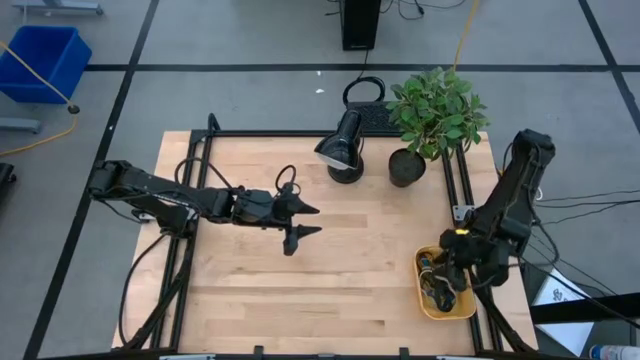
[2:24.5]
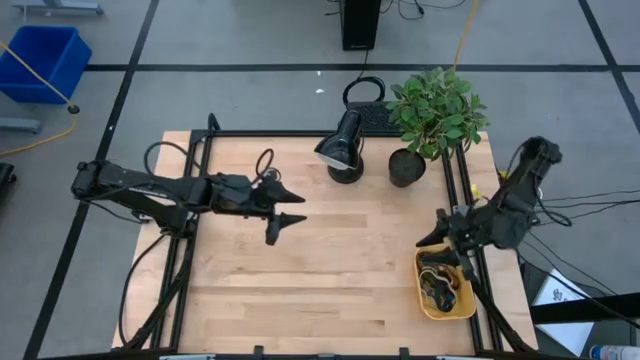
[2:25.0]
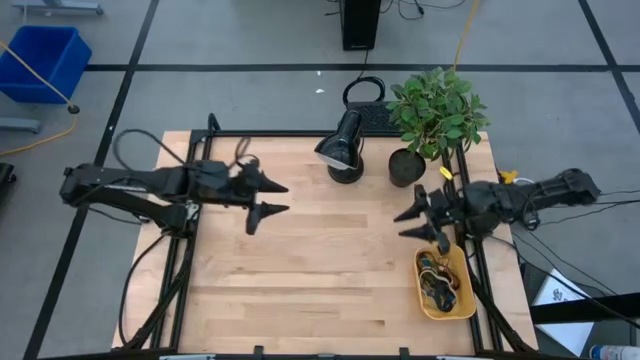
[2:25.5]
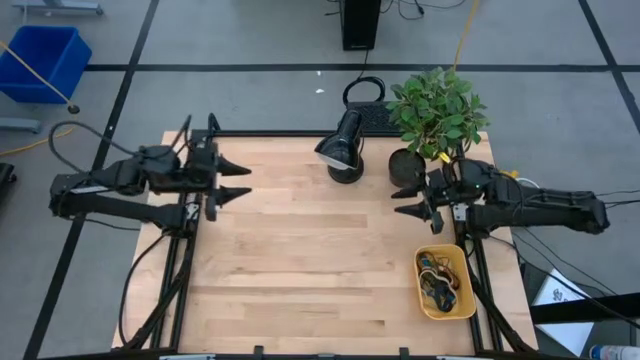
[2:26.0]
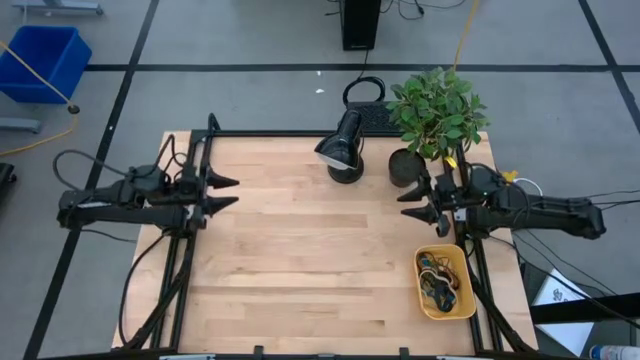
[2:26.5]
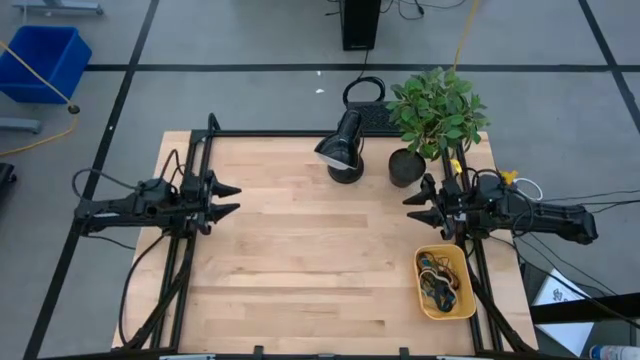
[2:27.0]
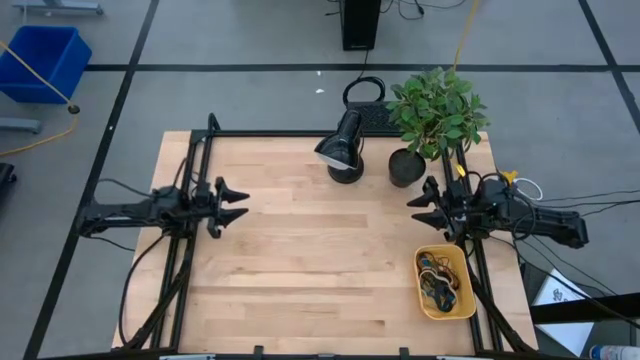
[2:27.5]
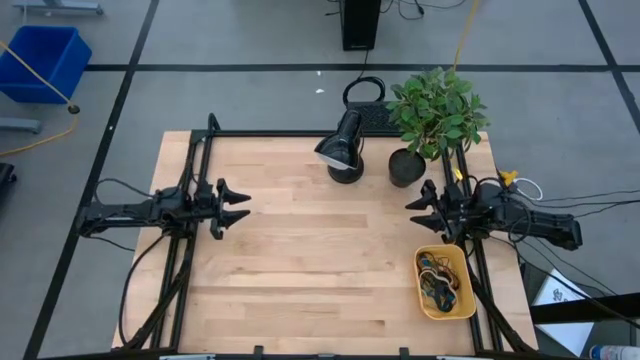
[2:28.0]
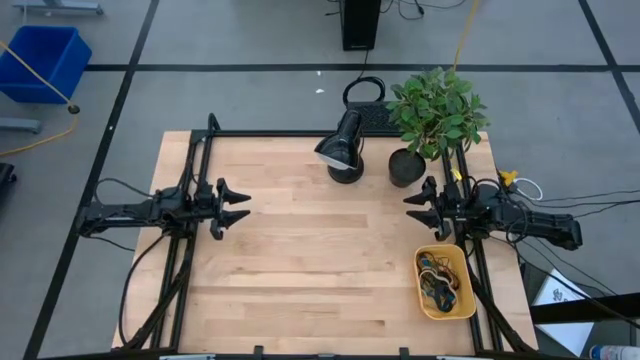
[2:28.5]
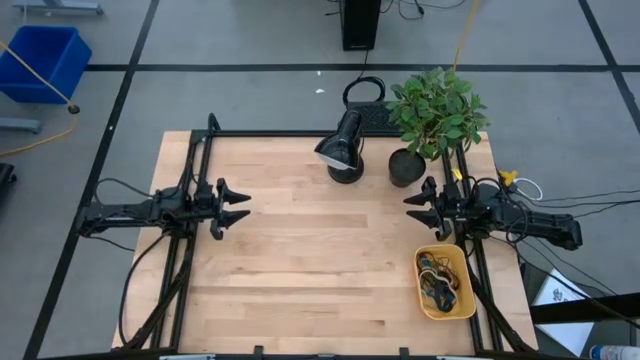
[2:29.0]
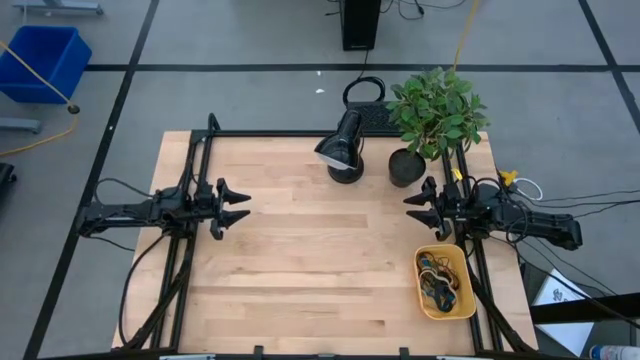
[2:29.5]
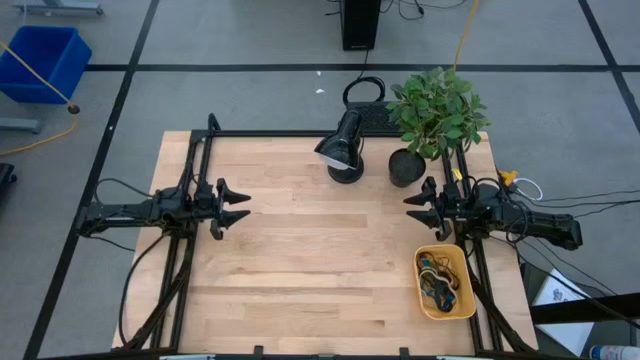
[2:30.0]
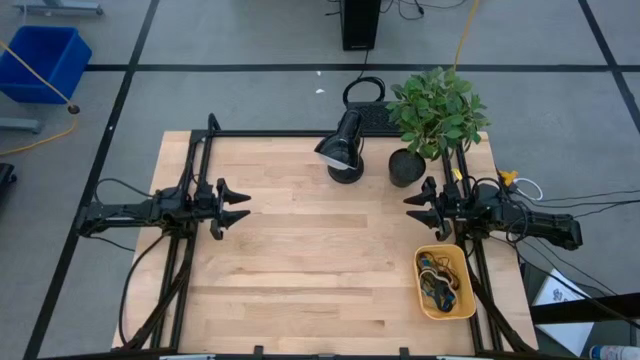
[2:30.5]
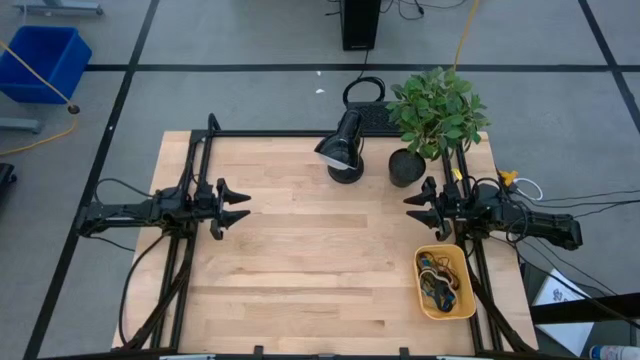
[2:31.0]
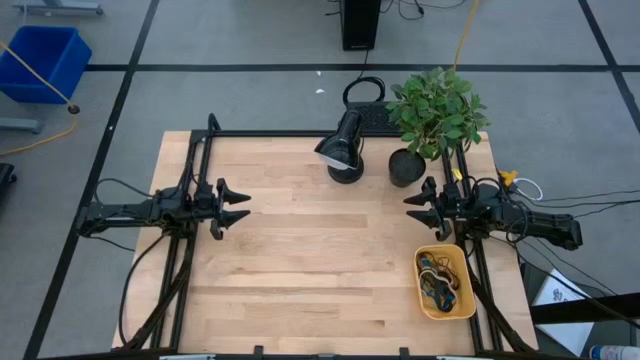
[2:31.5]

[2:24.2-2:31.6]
Task: Pick and place rubber bands into bin
Return to Home Position

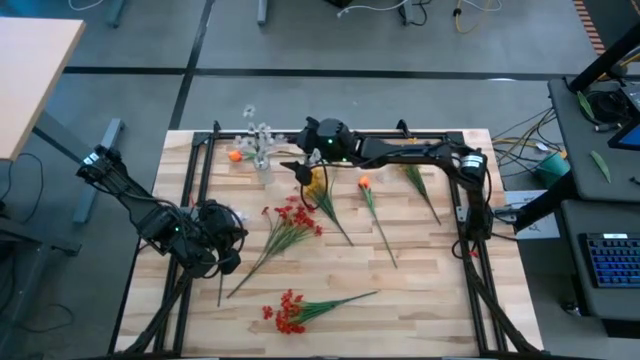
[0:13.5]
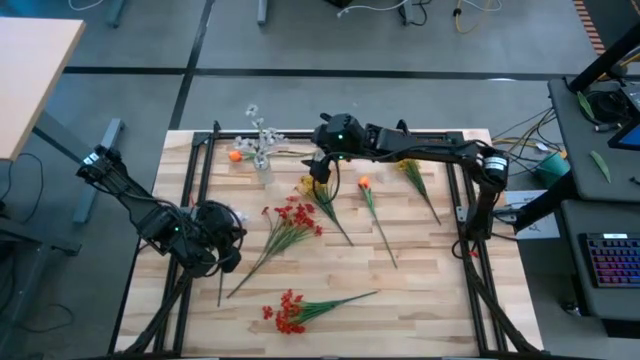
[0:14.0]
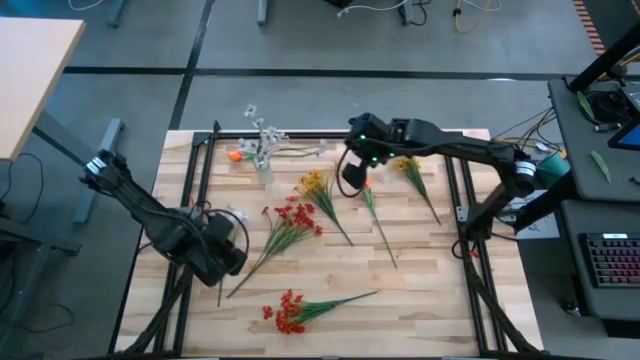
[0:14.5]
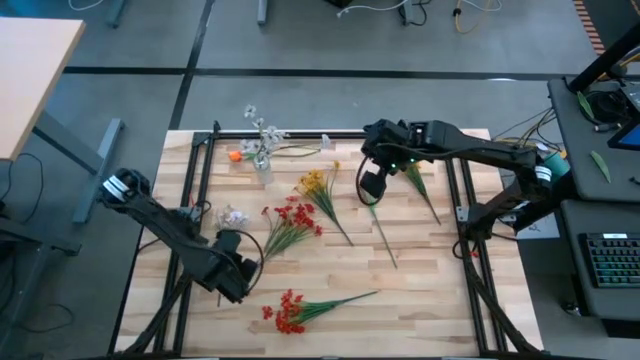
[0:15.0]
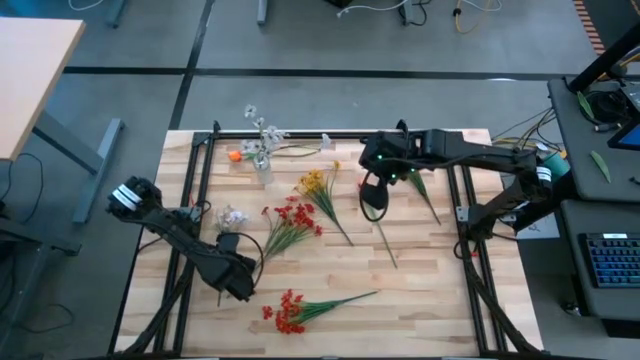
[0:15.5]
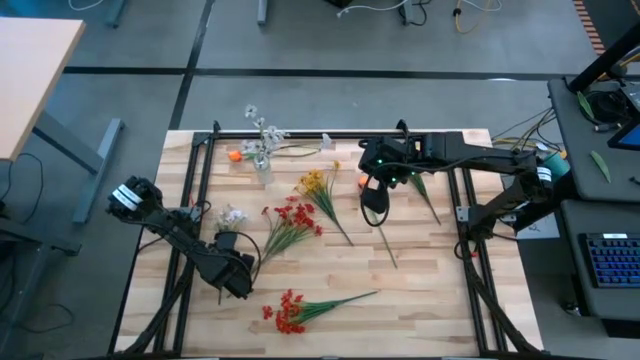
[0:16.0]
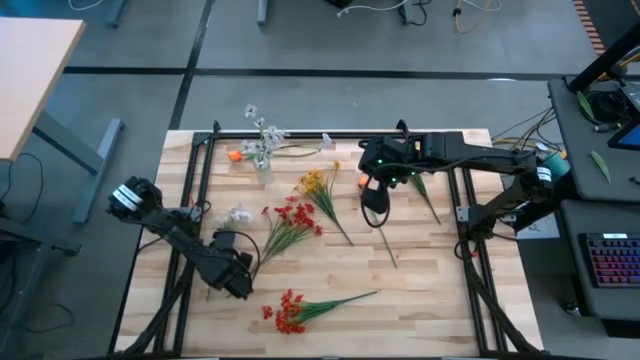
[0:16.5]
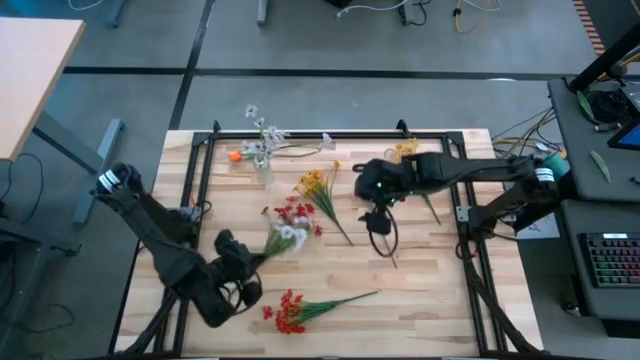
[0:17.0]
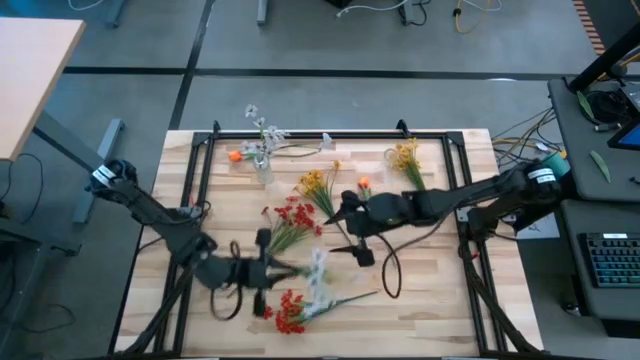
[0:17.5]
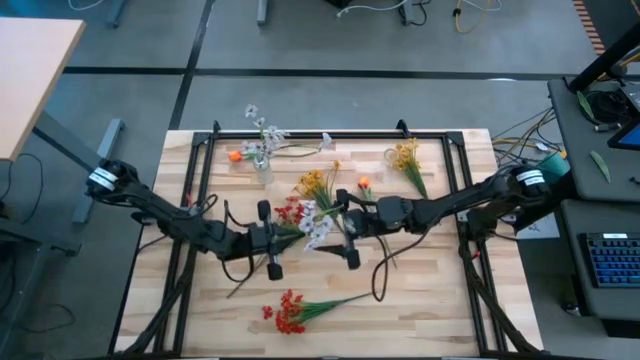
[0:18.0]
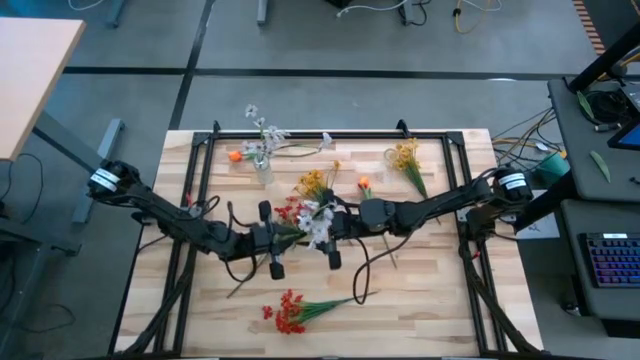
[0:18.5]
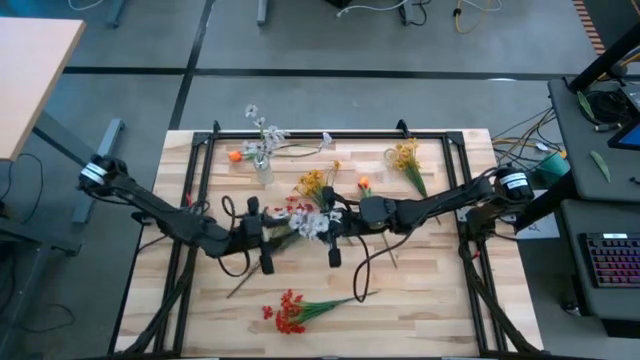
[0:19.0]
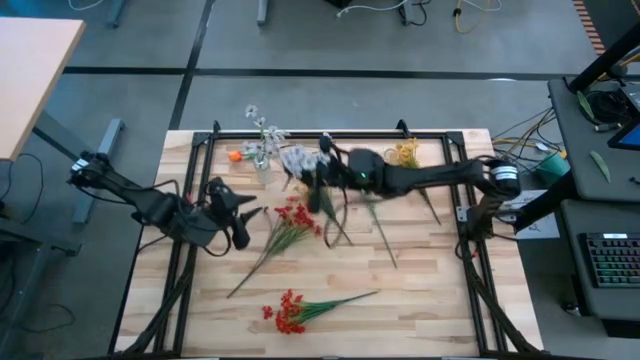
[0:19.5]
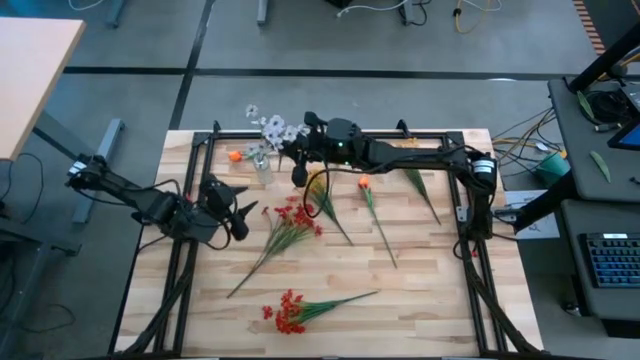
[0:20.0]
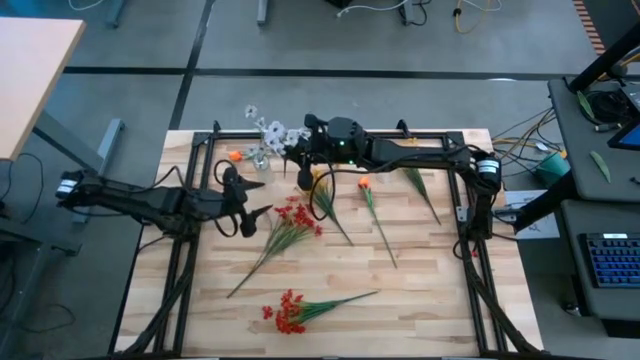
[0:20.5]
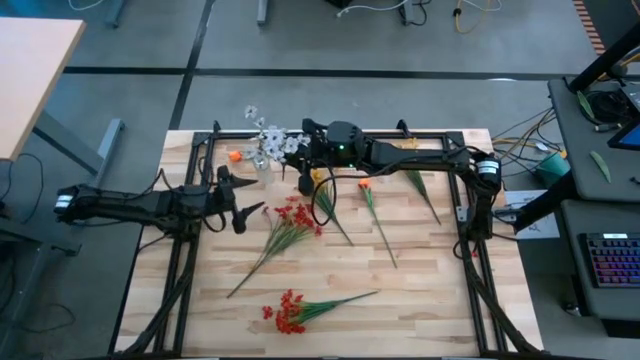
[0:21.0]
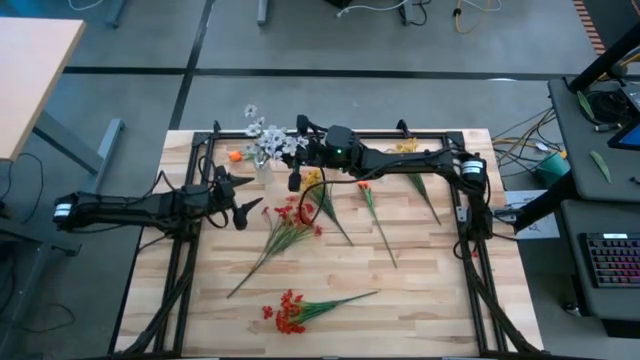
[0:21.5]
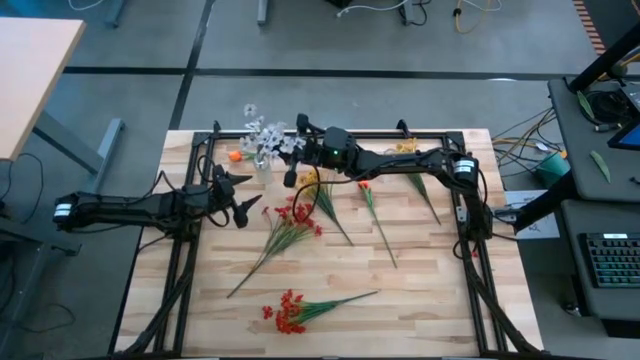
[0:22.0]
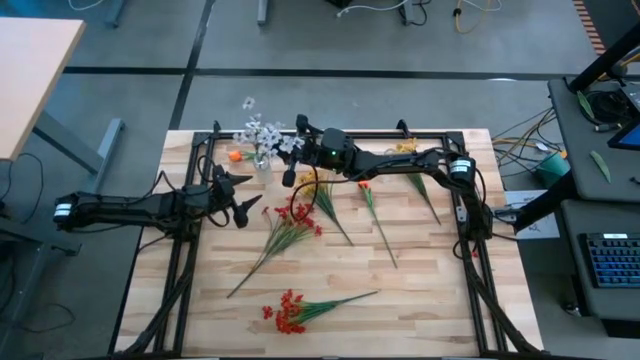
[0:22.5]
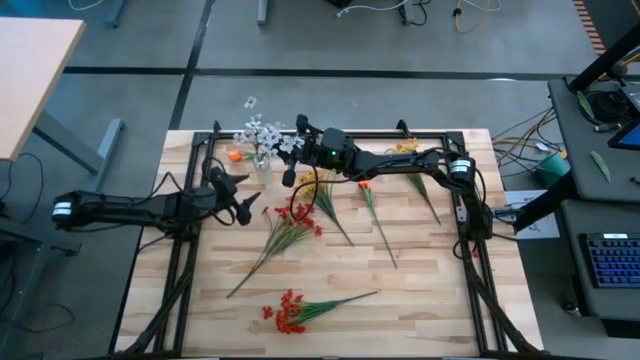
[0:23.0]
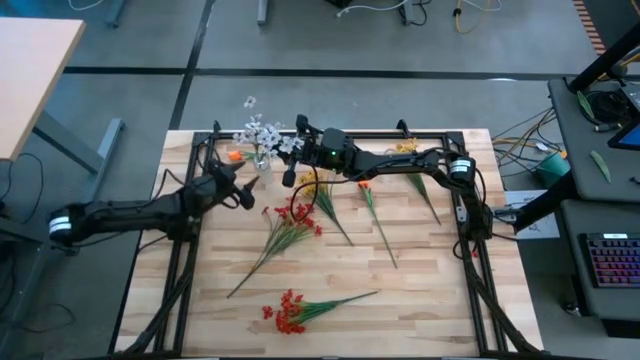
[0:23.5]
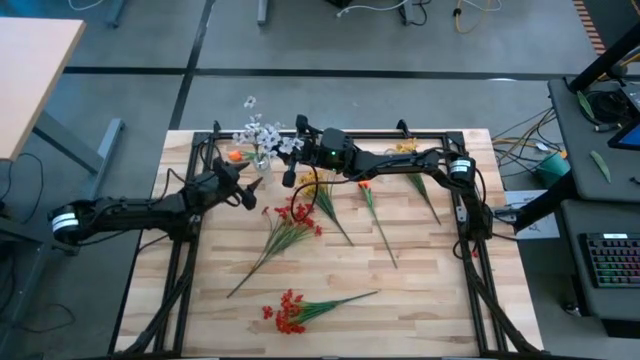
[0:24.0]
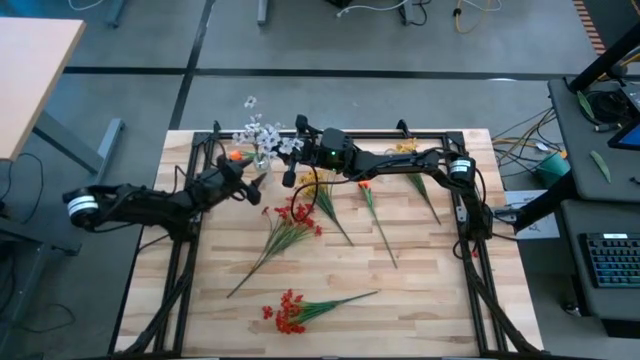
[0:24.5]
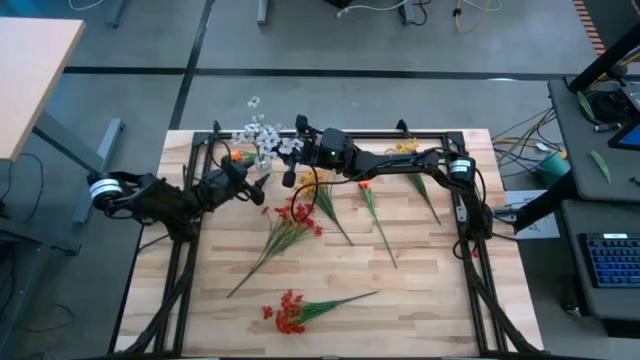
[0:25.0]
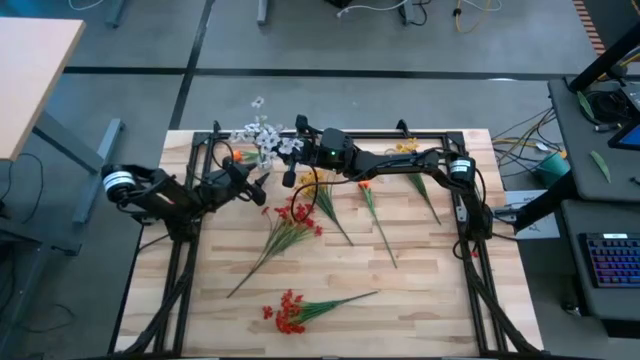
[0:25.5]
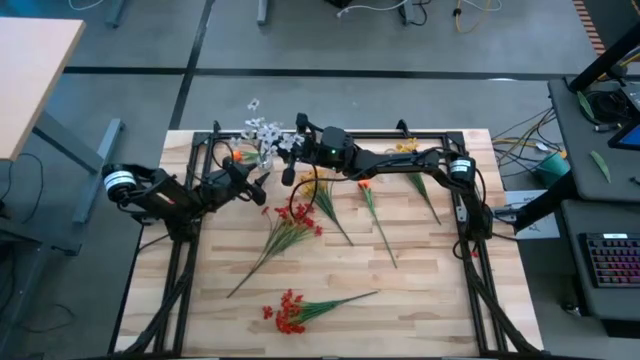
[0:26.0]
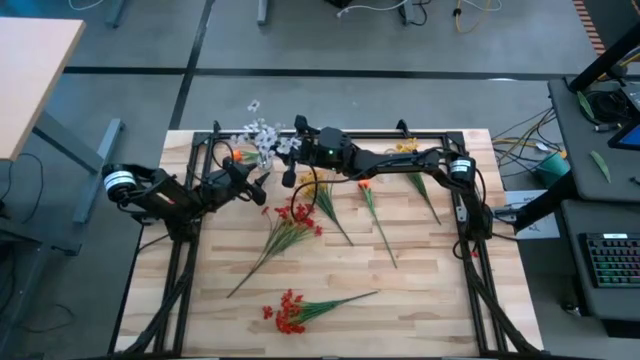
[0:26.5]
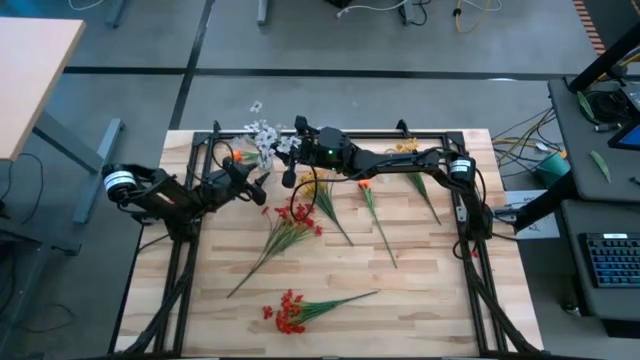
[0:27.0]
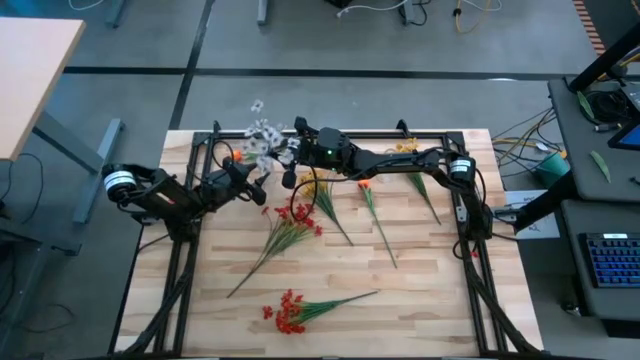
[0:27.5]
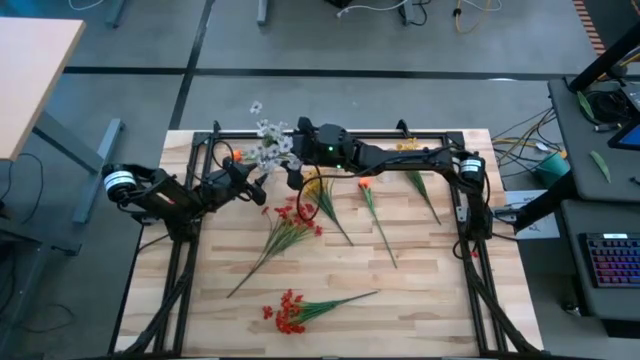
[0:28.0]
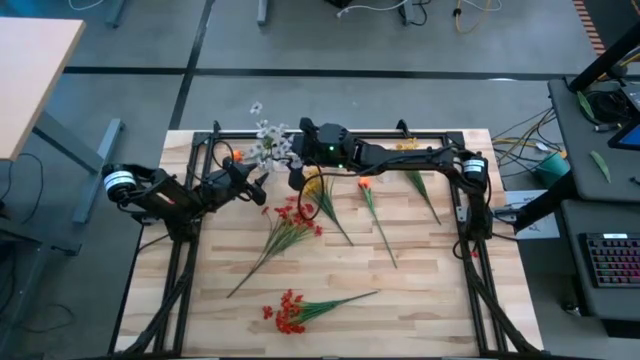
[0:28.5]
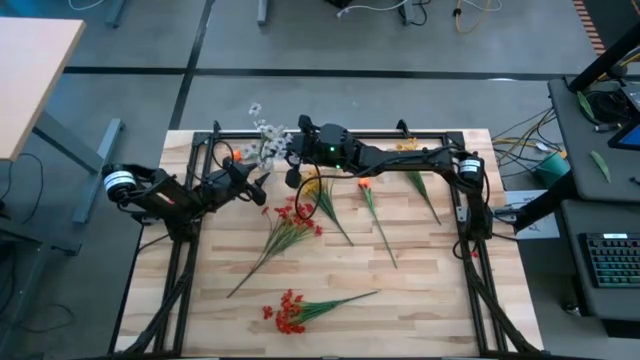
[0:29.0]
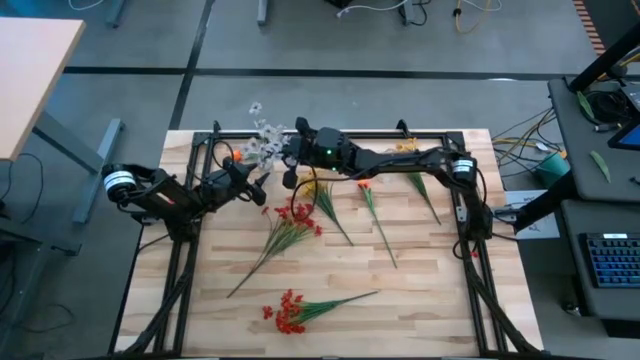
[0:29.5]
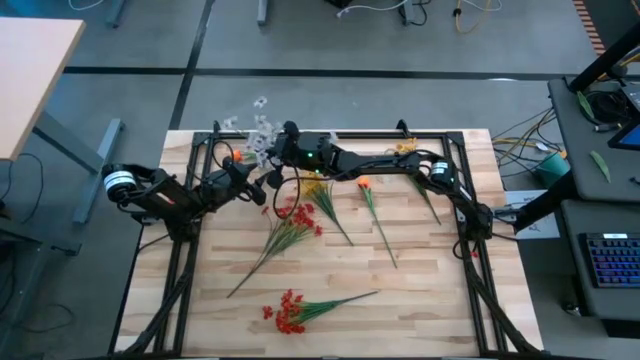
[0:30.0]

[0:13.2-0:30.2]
Task: Sort flowers into vase by color
Put the white flowers into the left transparent flower vase
